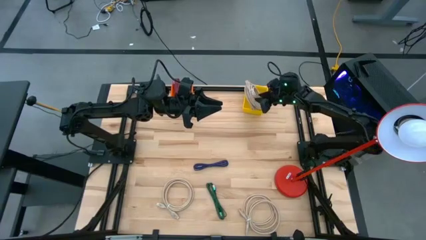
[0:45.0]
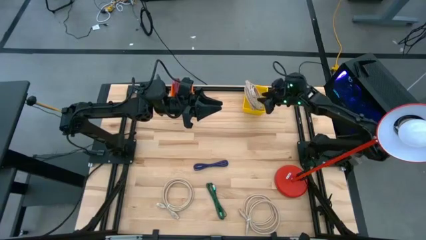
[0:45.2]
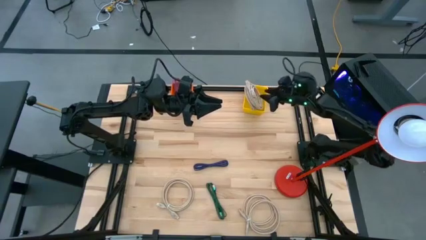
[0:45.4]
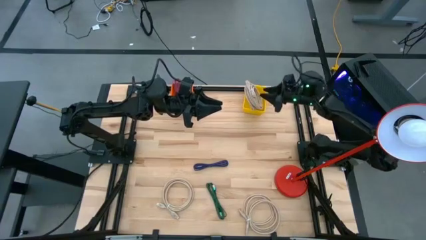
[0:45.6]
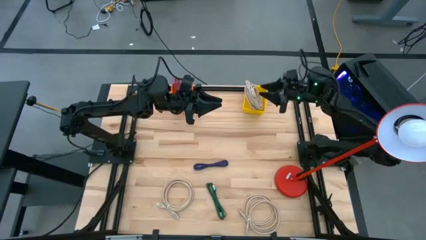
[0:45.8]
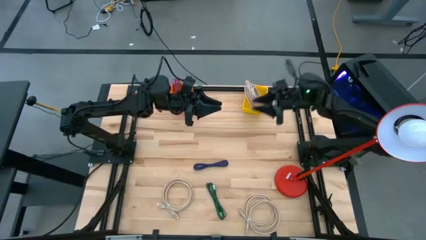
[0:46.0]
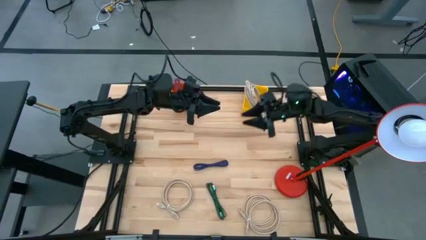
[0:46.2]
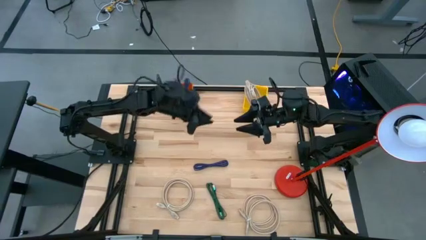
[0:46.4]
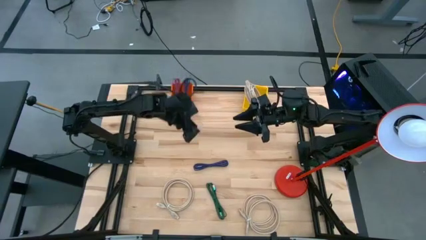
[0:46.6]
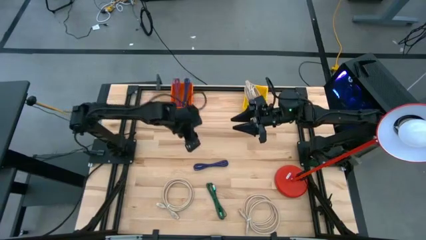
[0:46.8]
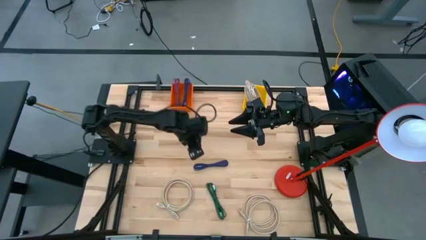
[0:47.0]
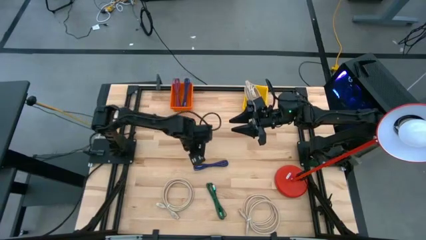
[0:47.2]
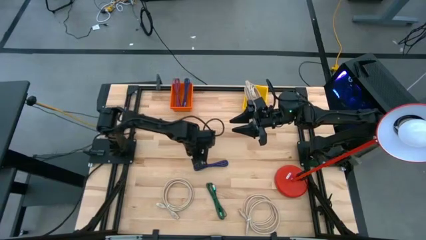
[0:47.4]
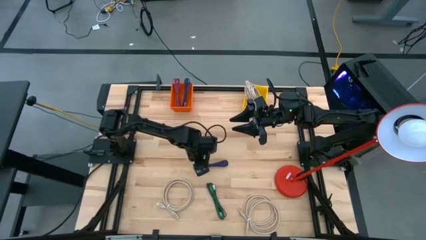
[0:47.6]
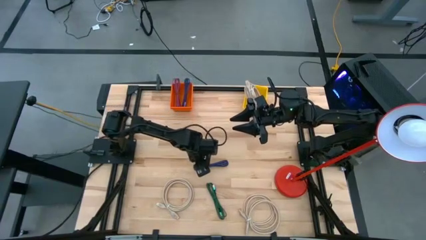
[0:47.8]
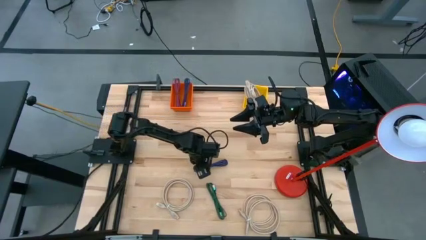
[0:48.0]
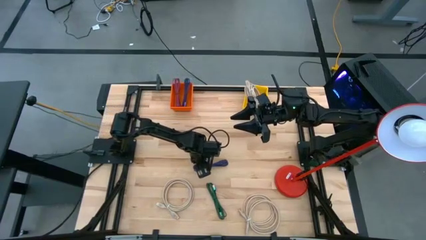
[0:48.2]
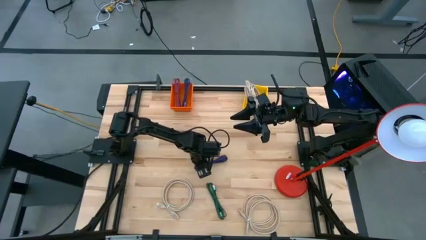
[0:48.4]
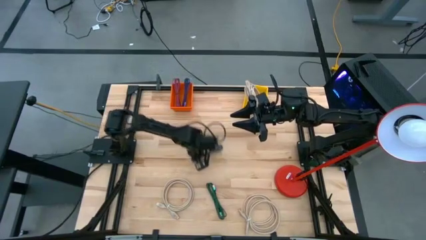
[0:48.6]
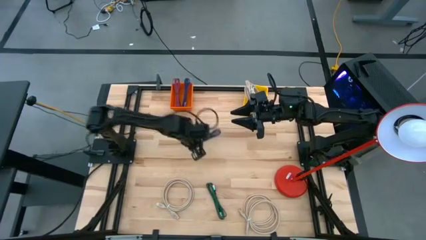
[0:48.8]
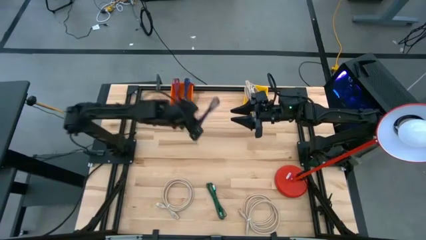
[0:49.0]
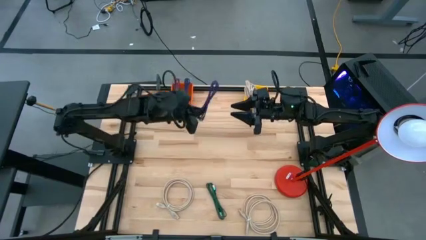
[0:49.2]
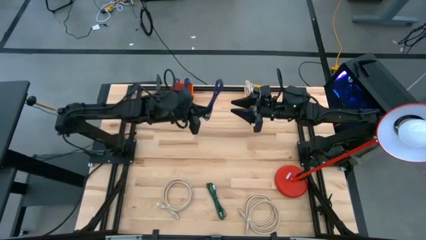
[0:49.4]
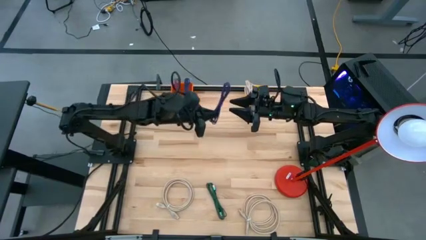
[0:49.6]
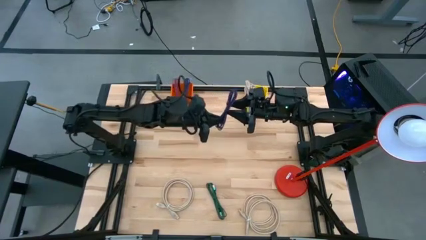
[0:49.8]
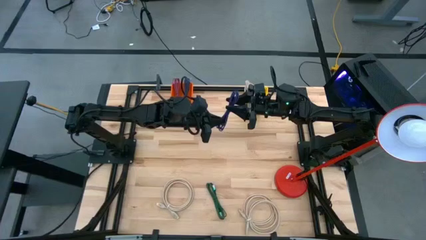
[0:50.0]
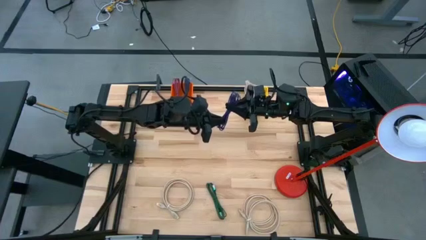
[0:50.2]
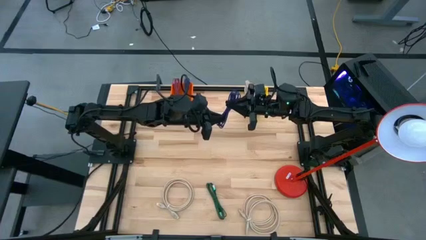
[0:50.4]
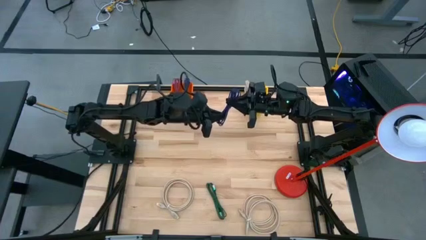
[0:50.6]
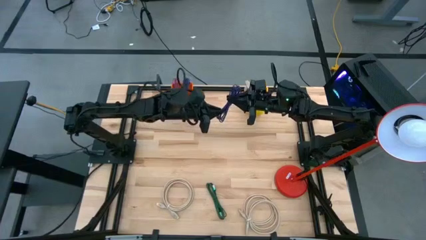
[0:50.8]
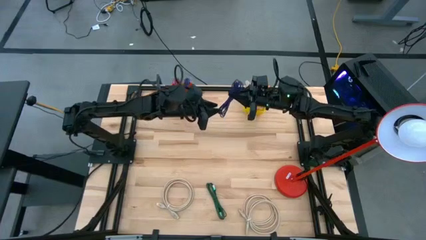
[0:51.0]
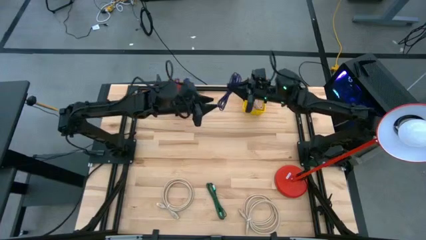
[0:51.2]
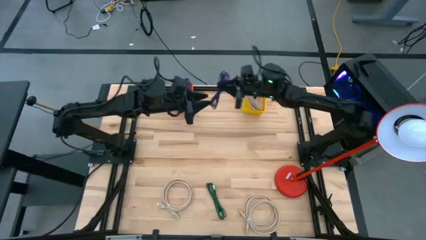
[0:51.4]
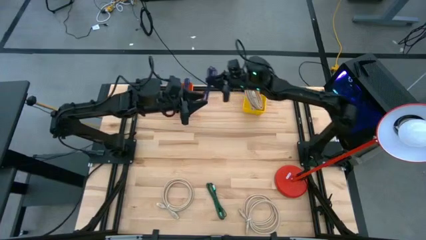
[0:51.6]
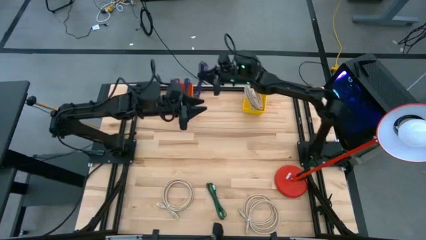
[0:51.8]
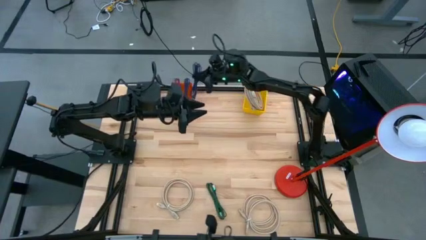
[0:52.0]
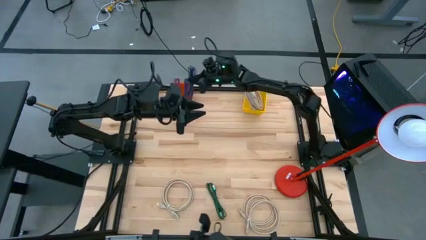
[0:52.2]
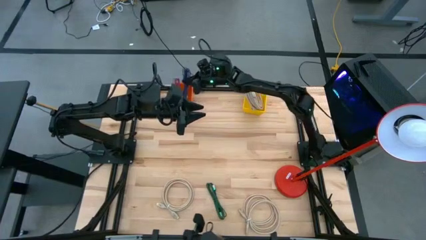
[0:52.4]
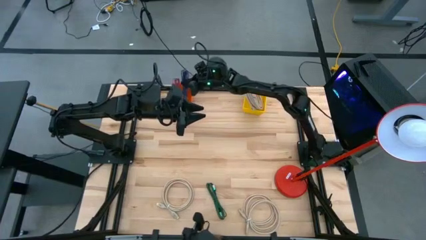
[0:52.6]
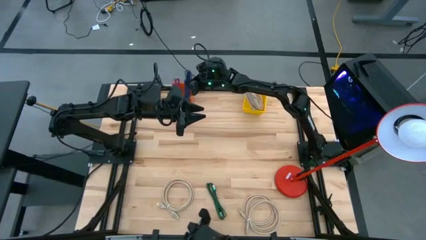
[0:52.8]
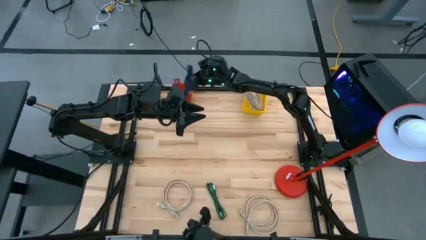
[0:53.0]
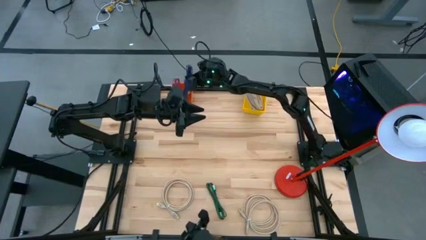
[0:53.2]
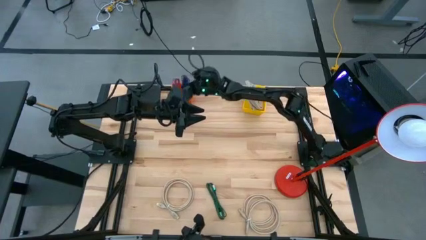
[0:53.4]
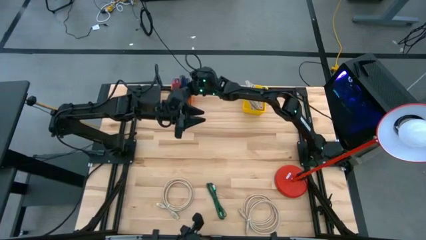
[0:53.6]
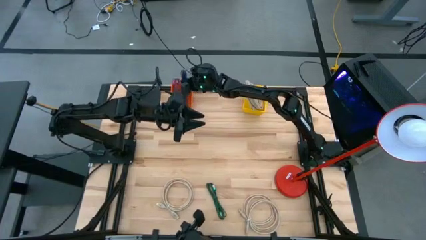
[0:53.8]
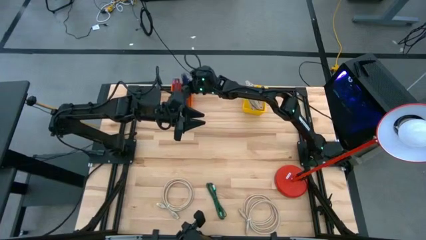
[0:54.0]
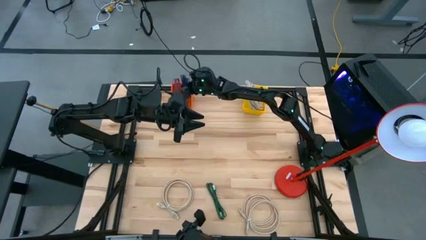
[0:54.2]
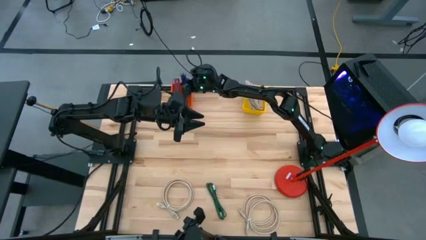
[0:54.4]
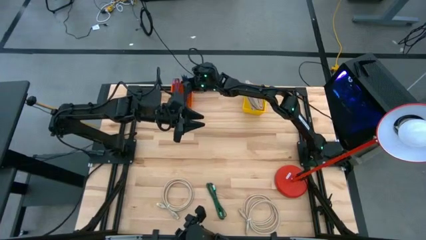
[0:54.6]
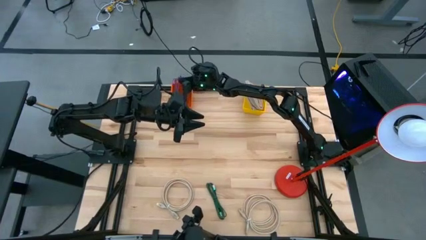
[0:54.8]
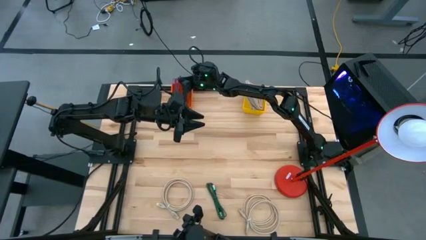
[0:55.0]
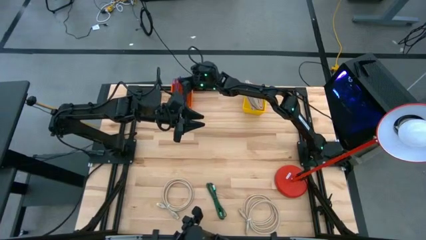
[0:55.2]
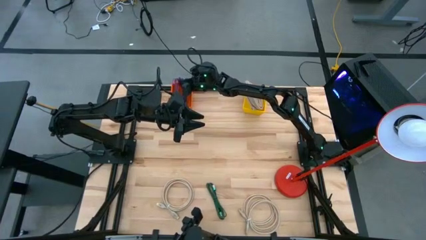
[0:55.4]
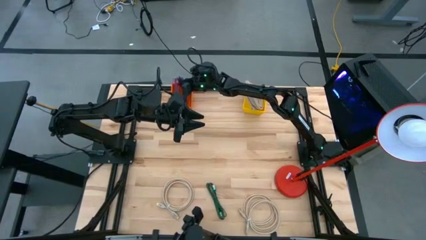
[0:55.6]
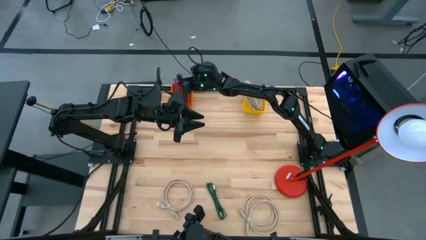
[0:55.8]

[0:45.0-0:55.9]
Task: Pick & Place USB Port
Put the blue charger cable into the orange bin

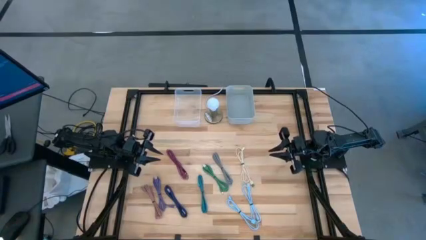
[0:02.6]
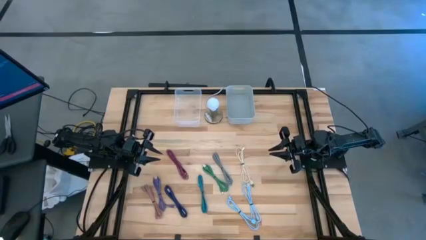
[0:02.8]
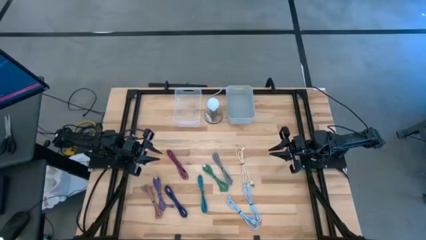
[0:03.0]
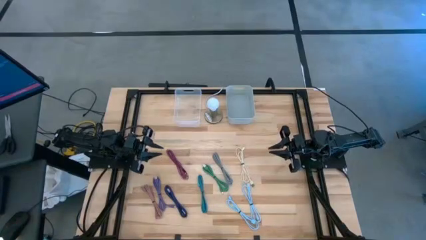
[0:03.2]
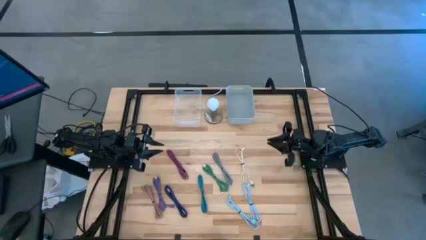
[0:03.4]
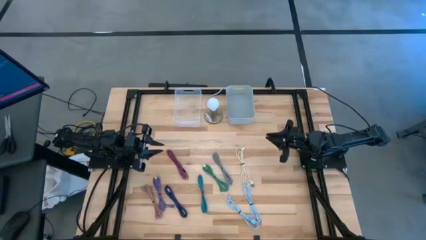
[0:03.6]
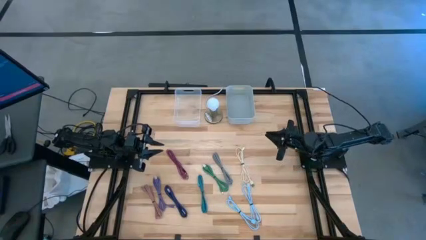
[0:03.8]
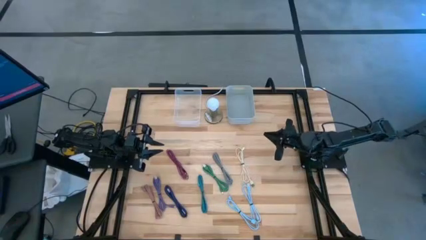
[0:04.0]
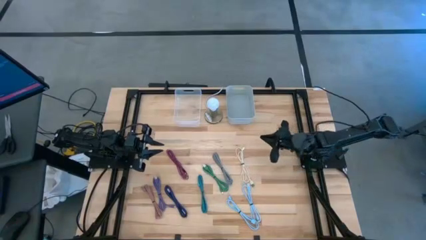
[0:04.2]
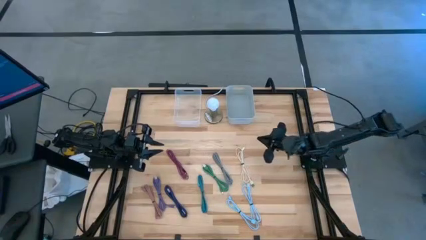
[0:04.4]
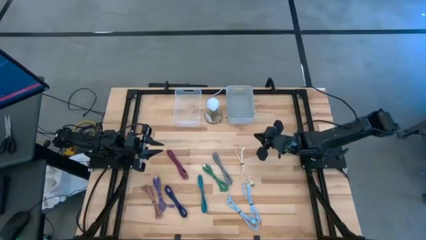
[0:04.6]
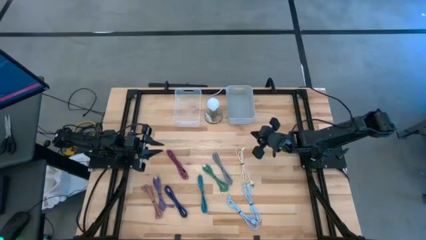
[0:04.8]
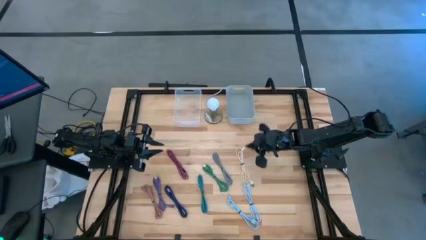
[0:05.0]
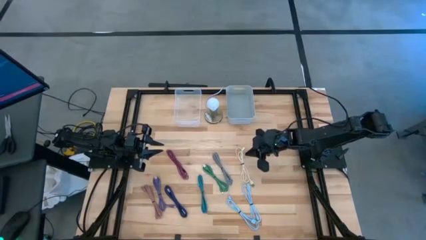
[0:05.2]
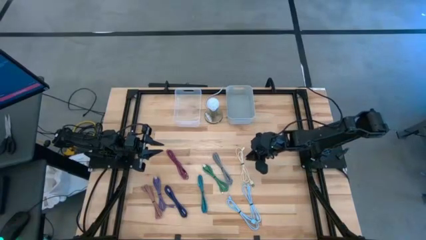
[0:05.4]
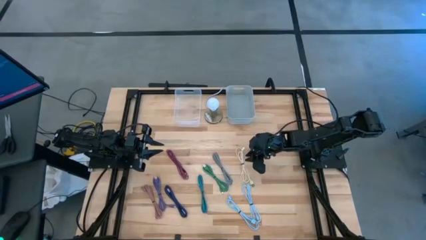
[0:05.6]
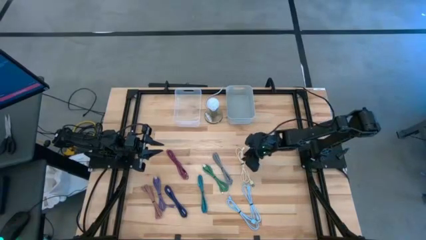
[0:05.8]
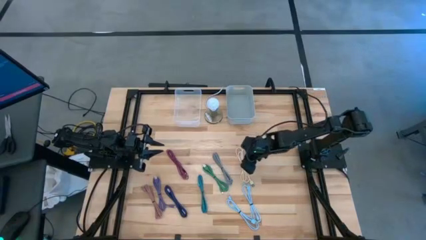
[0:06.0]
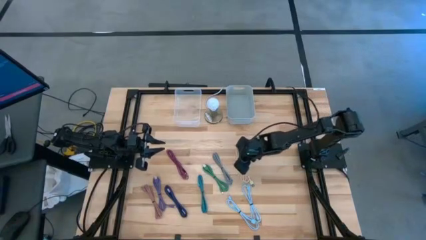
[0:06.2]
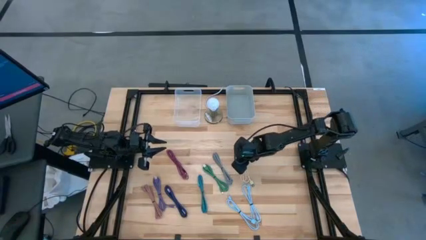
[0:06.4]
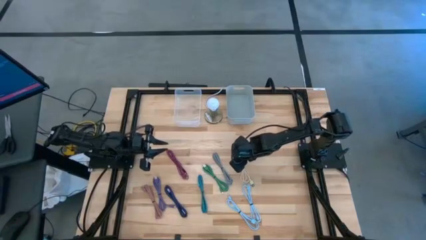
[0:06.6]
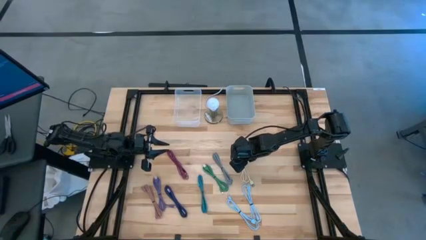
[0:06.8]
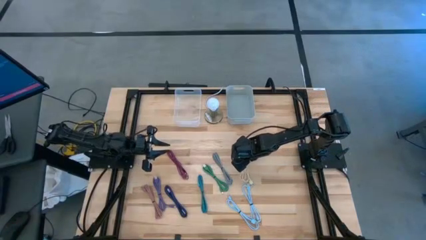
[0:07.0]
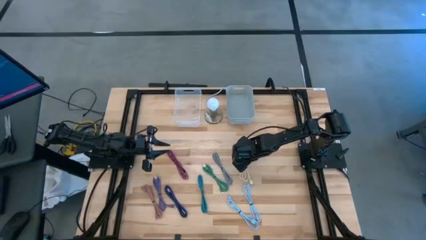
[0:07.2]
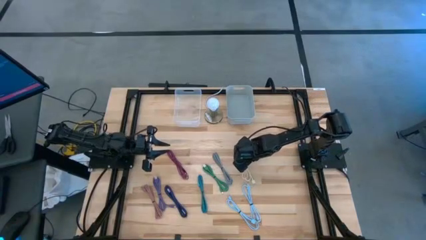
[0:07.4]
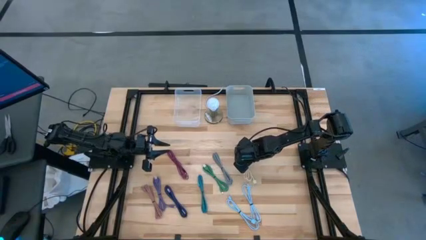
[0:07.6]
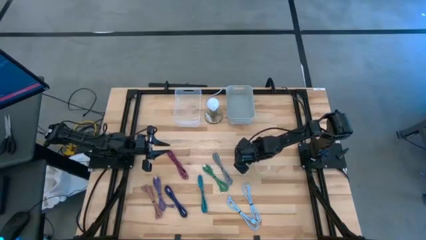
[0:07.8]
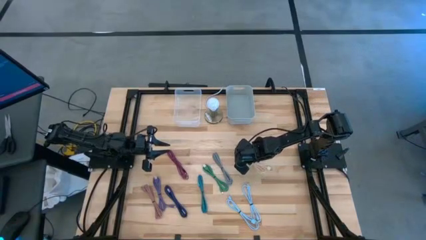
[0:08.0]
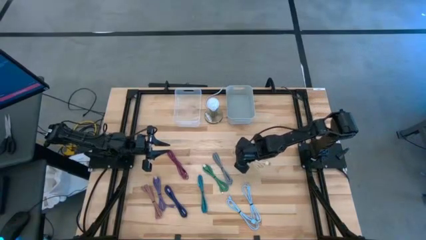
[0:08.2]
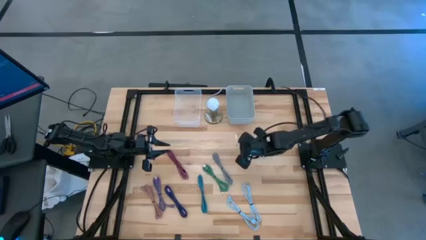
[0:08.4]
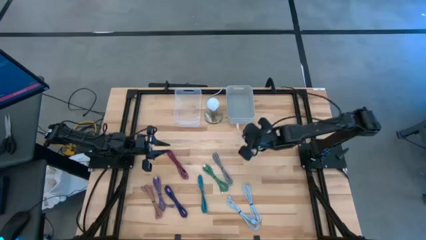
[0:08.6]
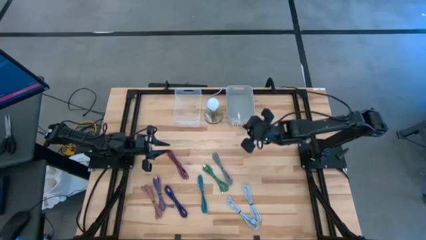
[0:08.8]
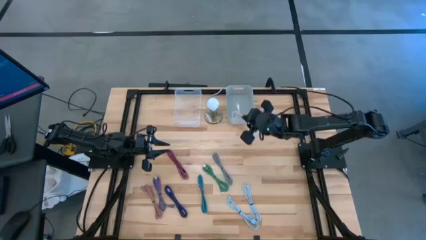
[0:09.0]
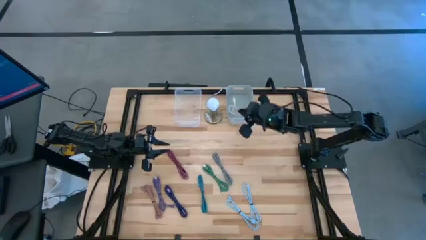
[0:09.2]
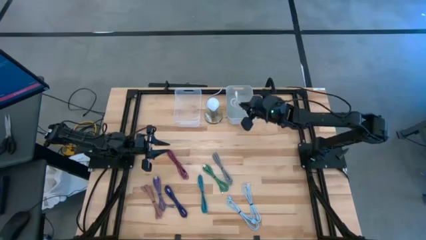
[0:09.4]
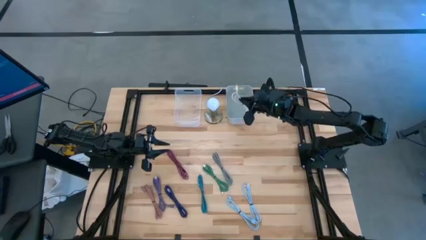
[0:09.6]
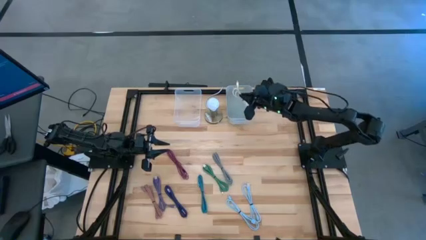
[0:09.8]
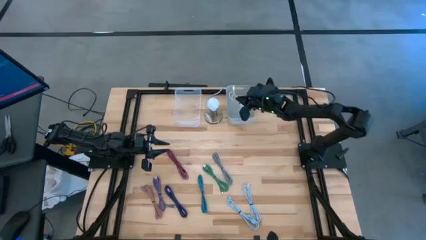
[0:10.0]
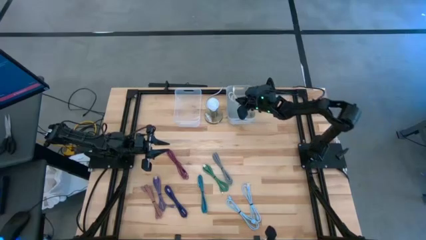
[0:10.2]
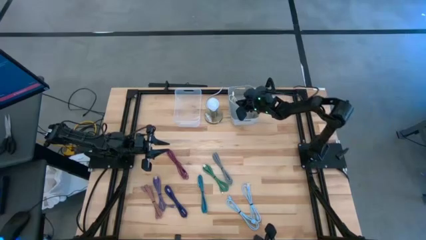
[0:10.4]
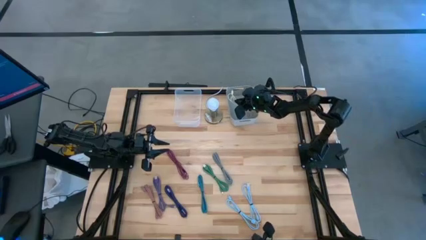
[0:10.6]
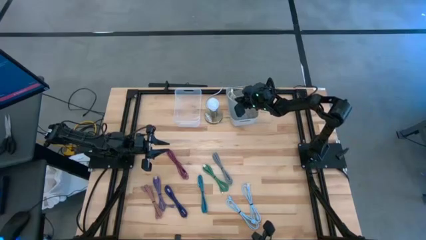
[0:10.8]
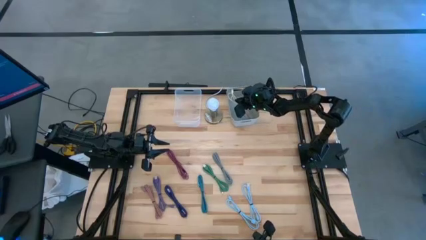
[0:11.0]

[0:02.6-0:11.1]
Task: Pick & Place USB Port
Put the white charger cable into the gray bin
